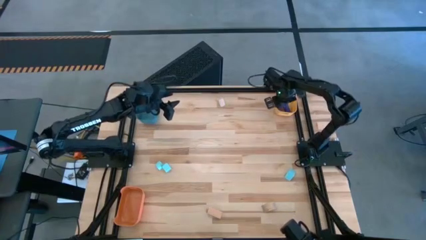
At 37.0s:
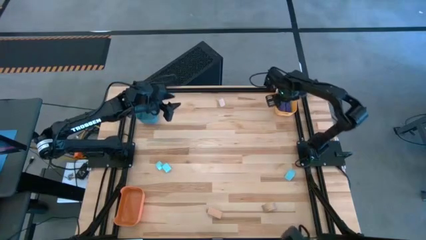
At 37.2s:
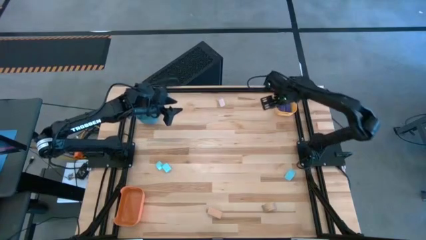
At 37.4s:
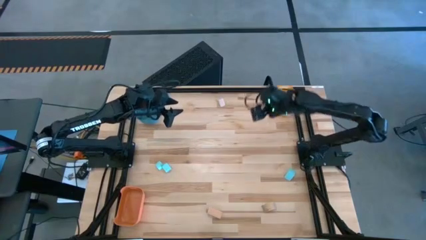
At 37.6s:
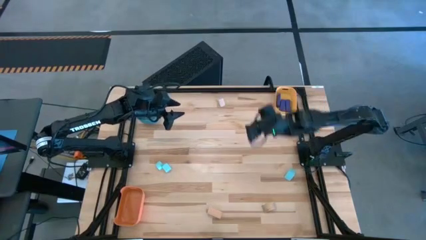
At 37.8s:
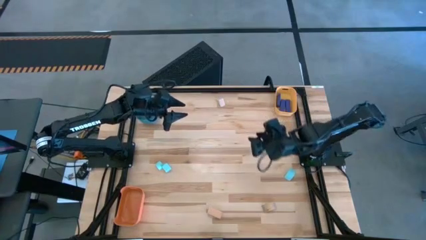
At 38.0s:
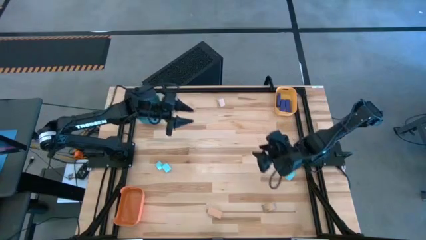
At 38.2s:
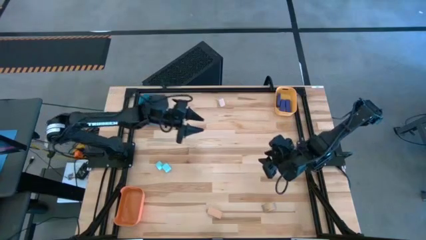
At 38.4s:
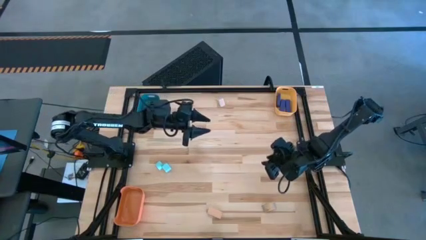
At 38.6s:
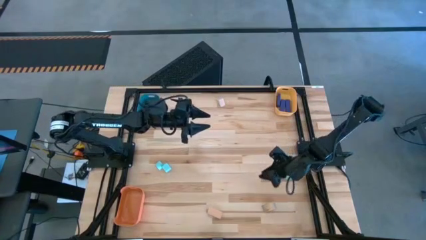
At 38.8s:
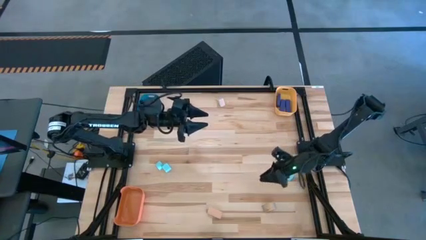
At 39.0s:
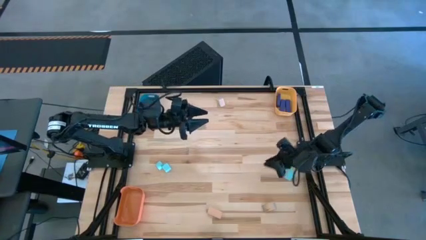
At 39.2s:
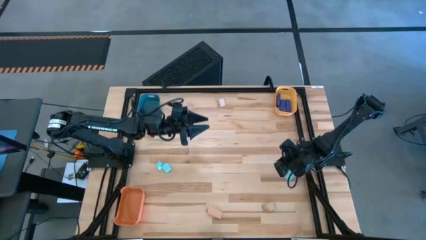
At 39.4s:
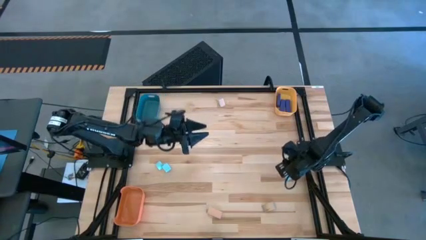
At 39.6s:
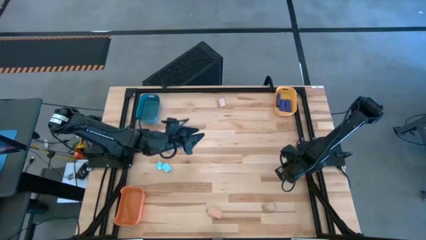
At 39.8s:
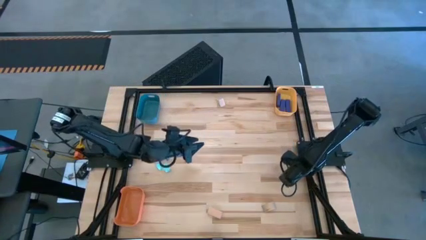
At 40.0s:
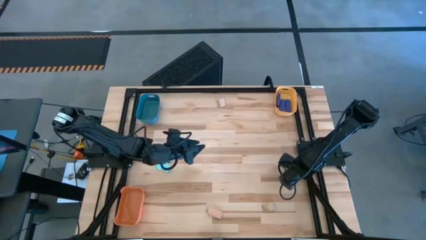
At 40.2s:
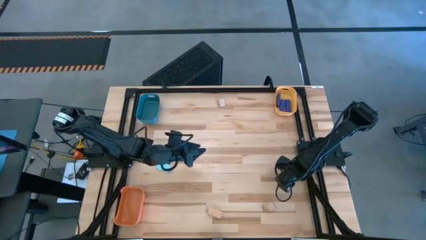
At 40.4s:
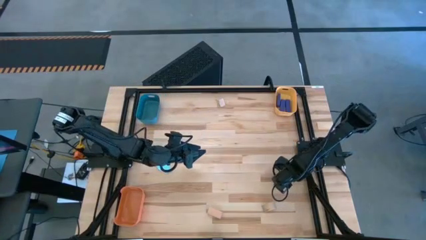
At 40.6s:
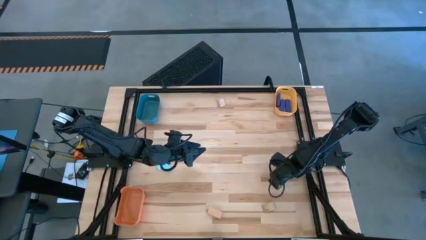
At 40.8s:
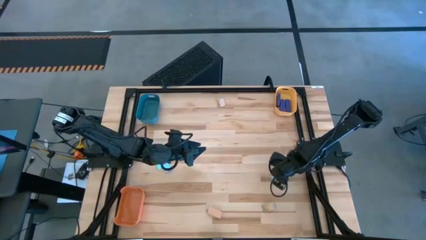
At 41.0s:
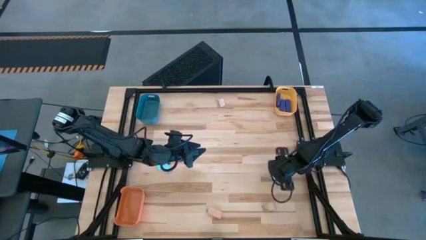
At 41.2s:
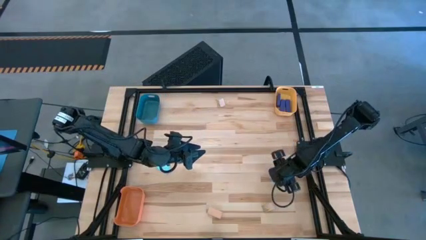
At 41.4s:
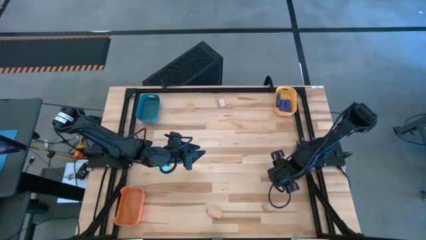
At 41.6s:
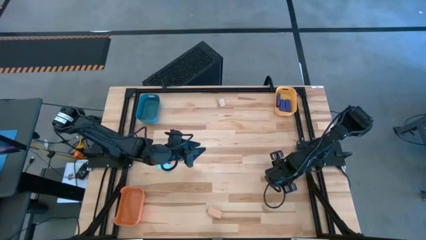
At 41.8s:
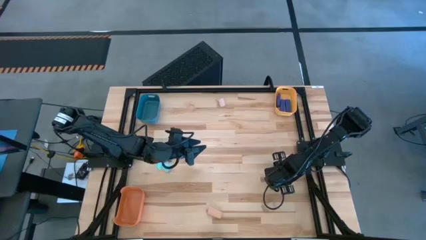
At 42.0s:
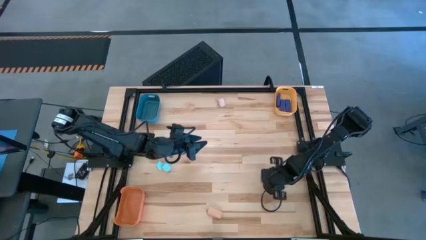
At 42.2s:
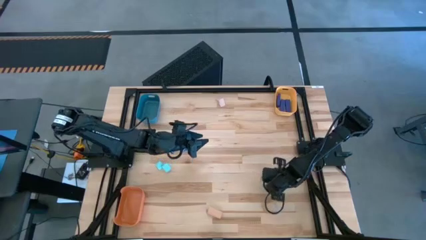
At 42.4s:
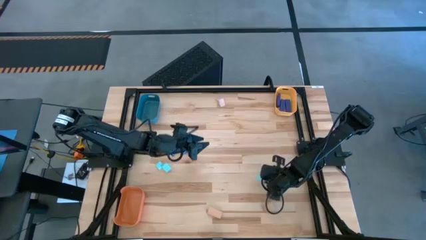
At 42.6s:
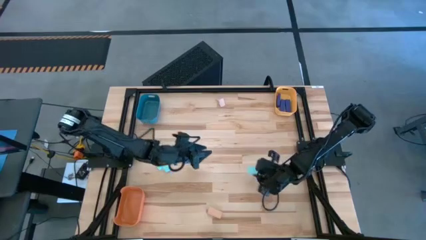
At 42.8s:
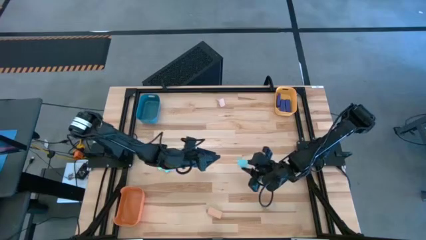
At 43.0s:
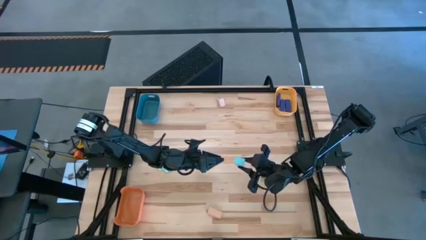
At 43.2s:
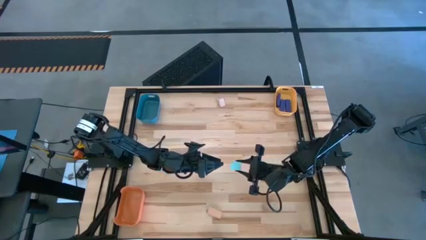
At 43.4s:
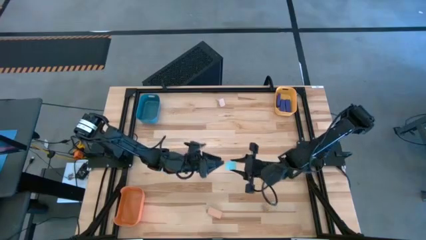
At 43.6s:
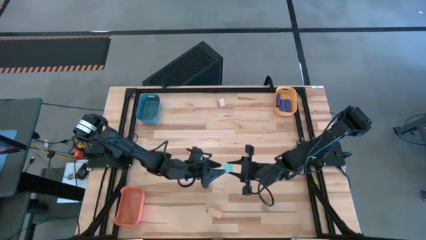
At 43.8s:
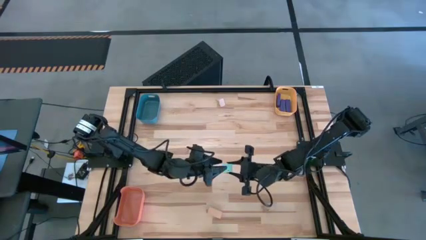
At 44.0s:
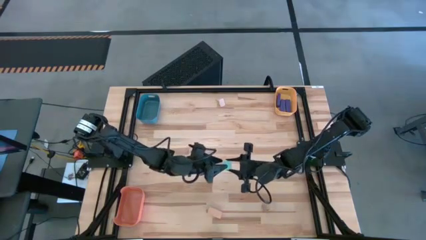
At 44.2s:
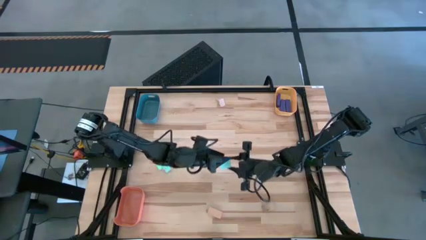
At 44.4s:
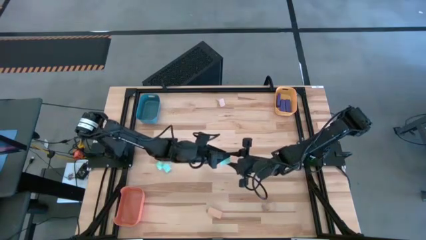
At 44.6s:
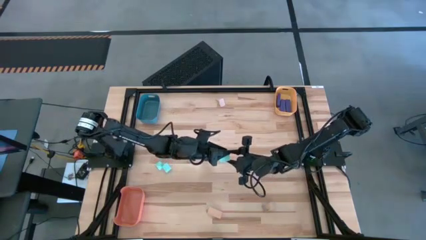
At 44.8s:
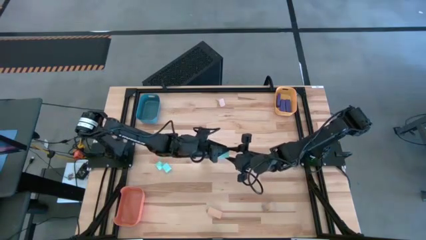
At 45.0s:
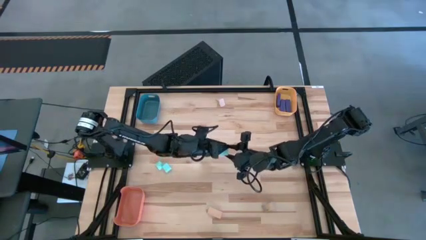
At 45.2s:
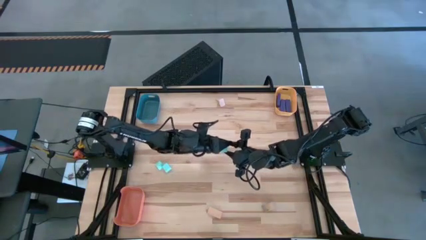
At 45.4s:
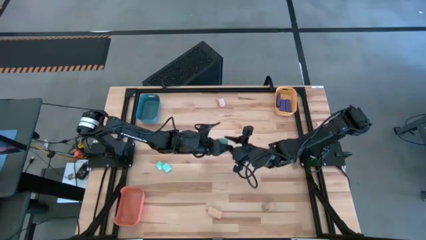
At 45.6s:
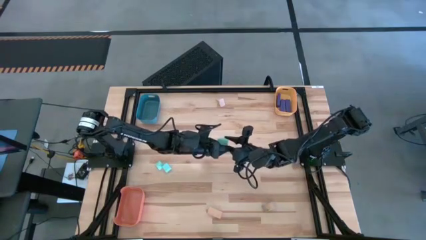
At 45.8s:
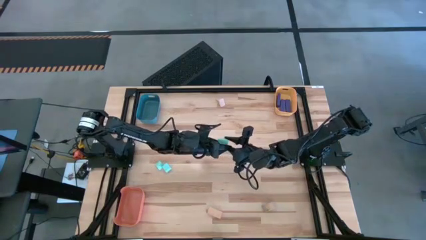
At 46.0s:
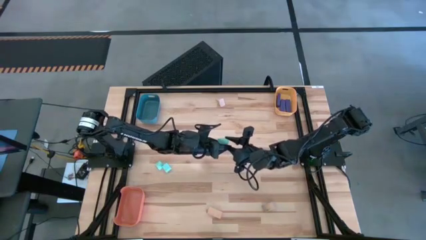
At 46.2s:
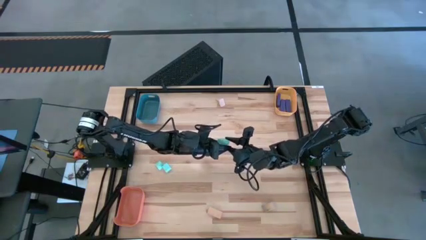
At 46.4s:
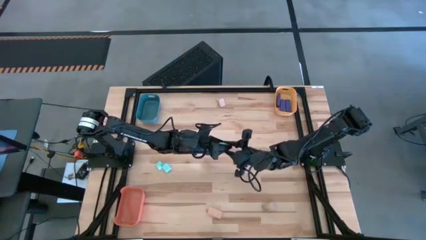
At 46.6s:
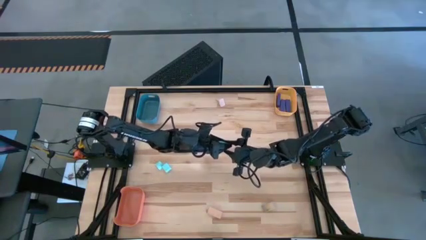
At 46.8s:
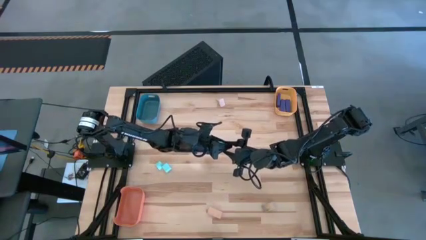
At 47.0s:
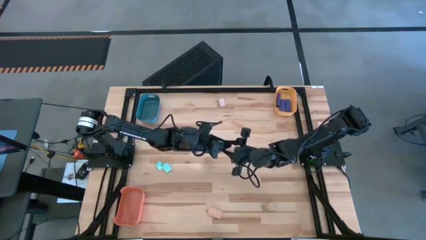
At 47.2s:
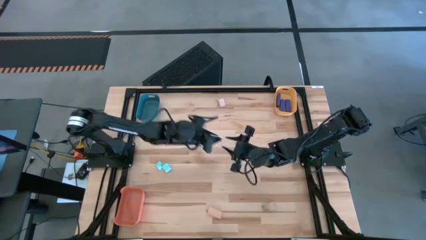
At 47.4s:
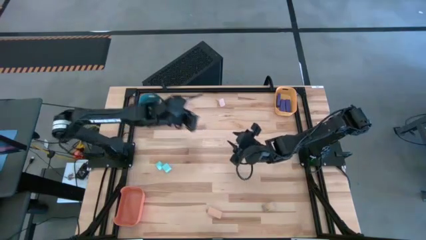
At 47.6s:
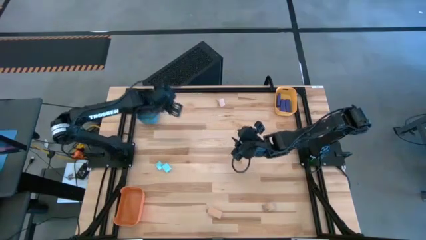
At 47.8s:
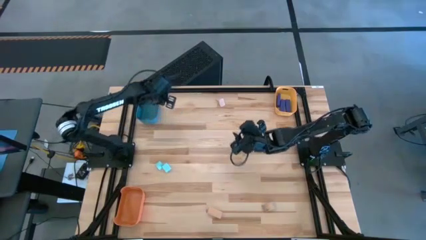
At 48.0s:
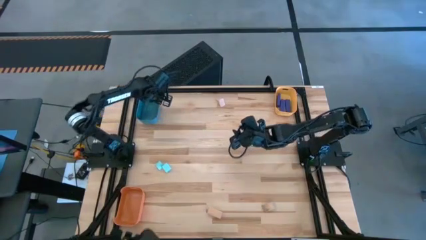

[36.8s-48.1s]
Task: Sort & place blocks by color
Put the right light blue block into the blue bin

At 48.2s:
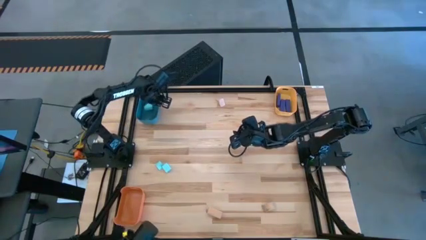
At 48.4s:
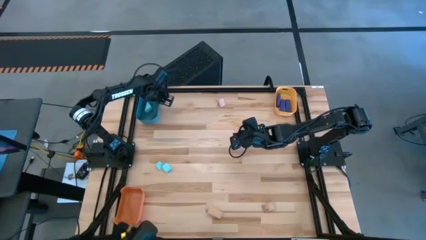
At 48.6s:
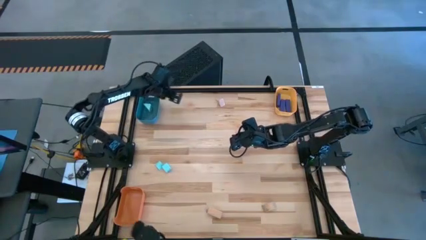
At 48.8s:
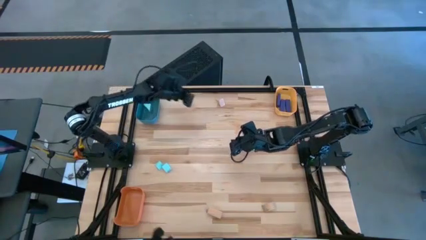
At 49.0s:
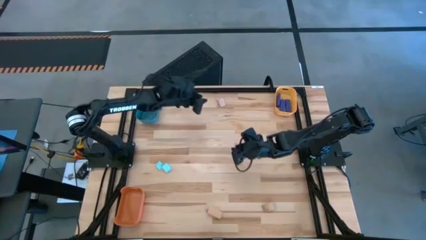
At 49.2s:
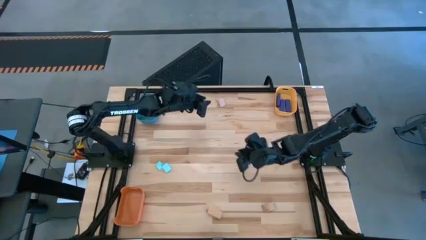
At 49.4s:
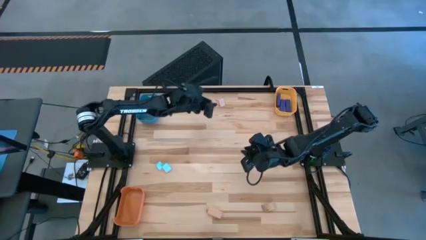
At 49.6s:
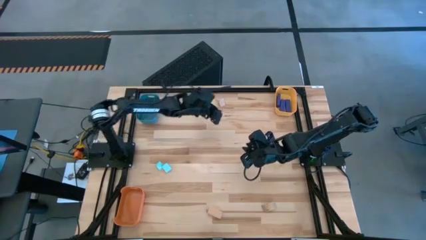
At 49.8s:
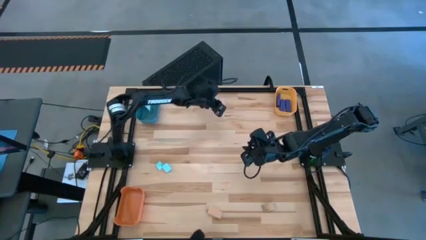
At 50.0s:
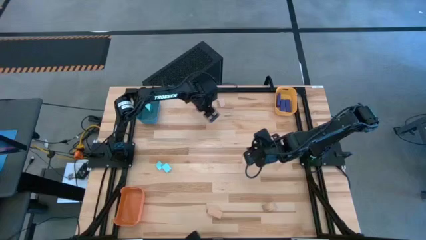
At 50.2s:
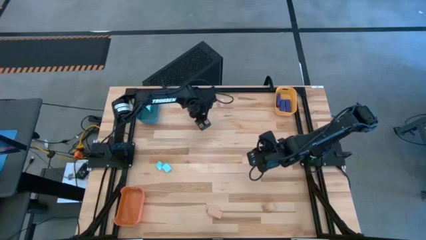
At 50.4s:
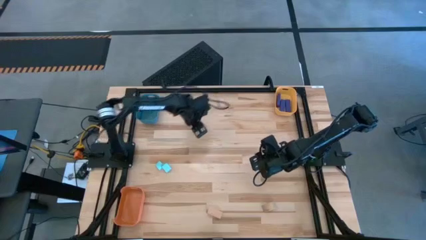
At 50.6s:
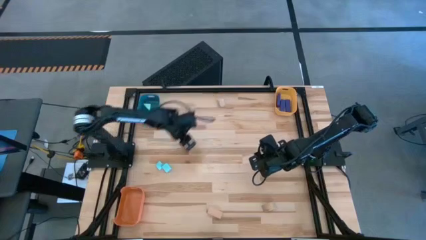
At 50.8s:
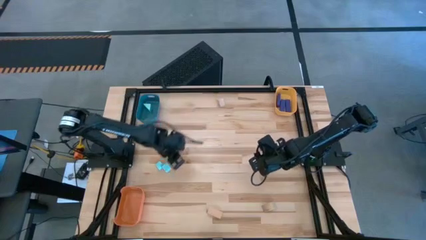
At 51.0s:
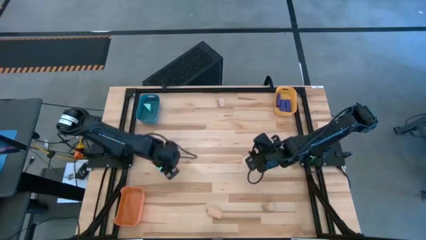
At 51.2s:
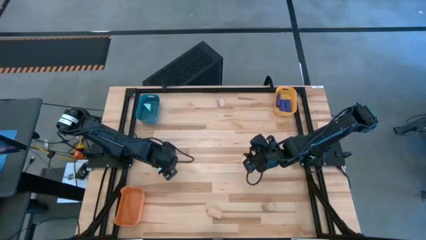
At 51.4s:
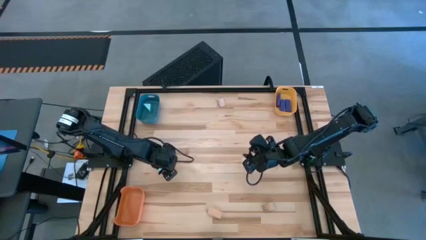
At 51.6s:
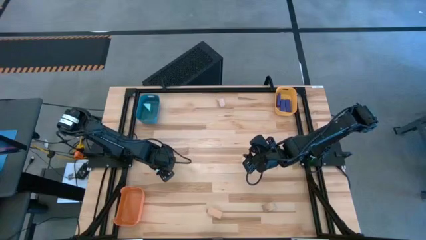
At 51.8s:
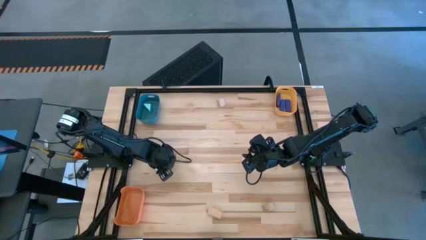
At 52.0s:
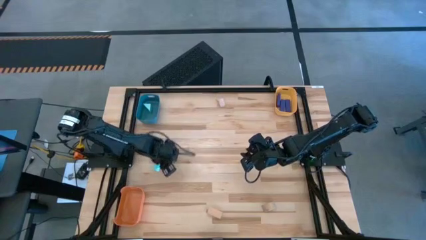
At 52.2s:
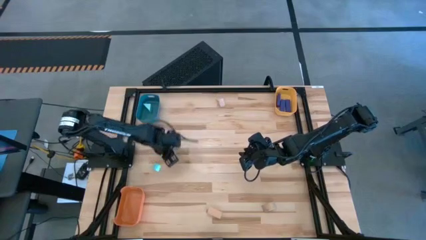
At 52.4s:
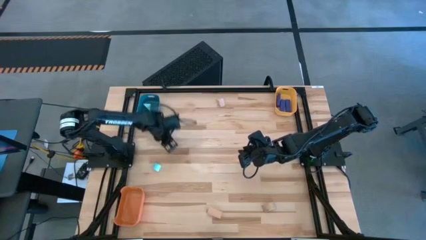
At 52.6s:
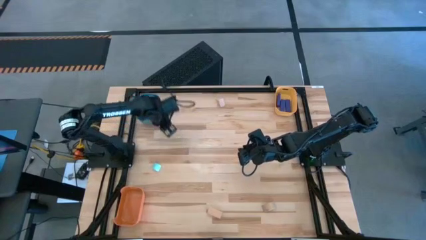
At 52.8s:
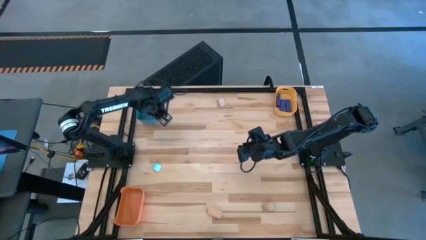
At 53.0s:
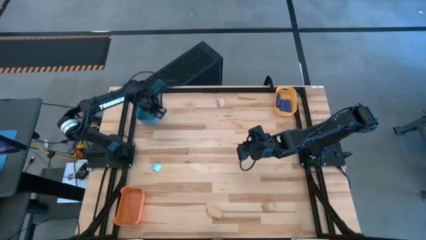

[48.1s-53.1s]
Put the right light blue block into the blue bin
